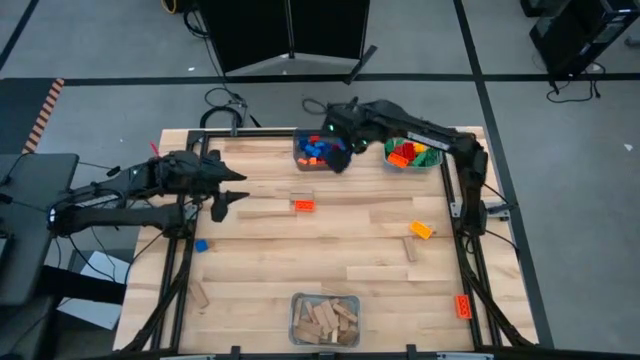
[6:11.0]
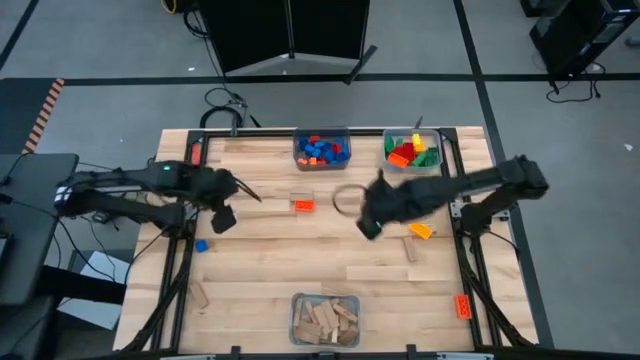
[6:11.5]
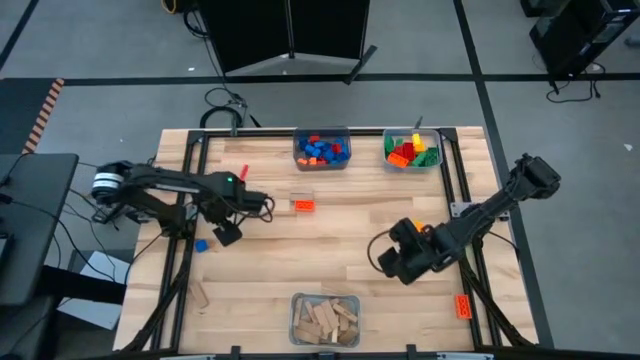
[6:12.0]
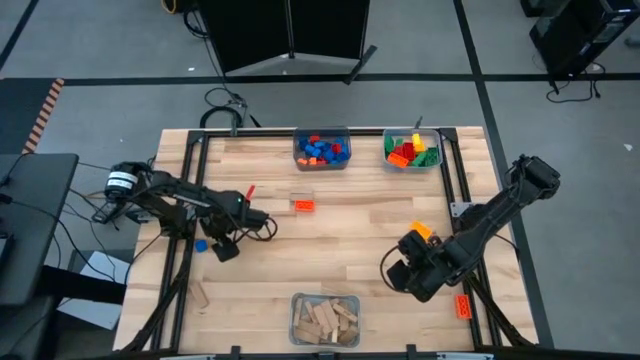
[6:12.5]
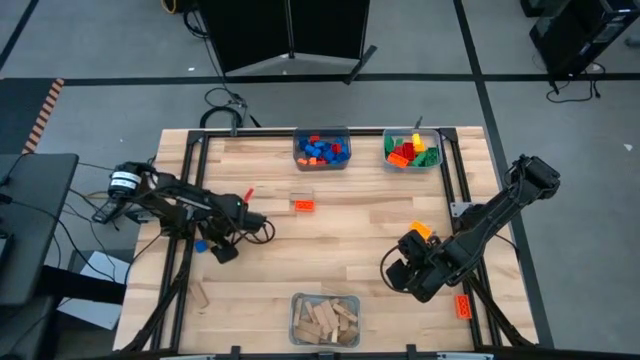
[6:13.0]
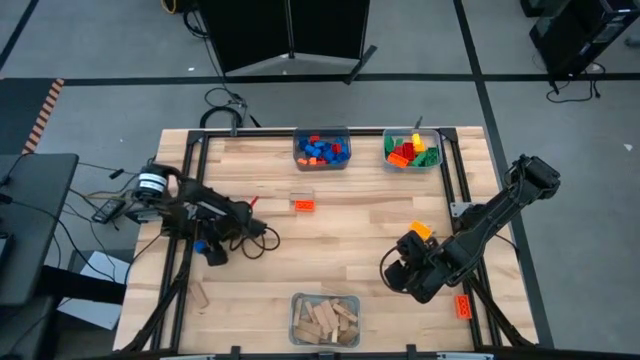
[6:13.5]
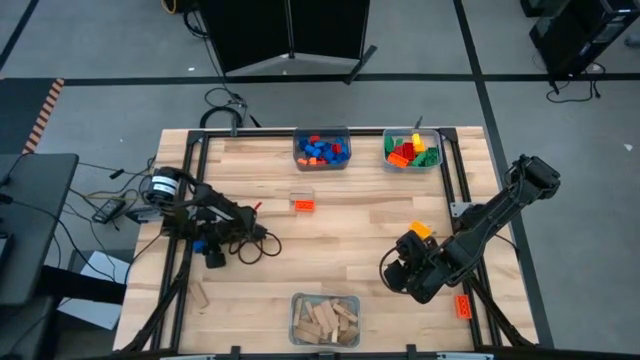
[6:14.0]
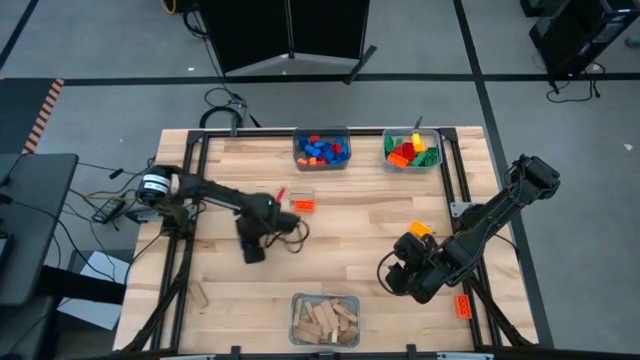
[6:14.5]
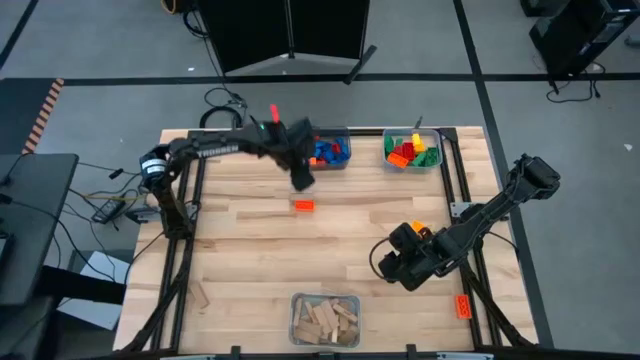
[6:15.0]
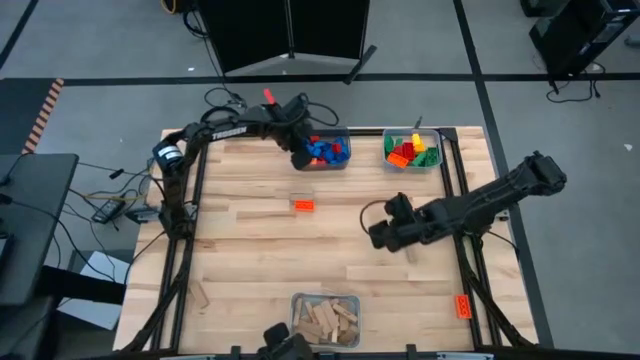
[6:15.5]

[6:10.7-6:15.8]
Task: Sort blocks by size
Put the small blue game piece into the black bin

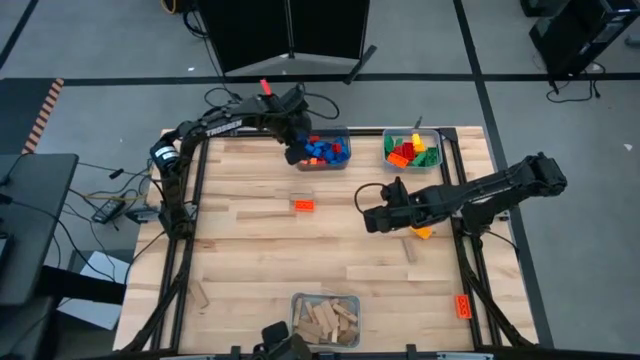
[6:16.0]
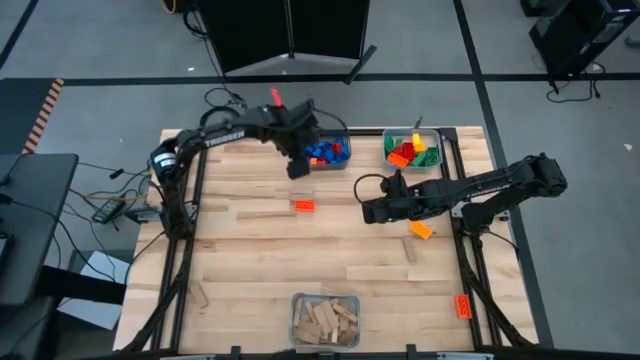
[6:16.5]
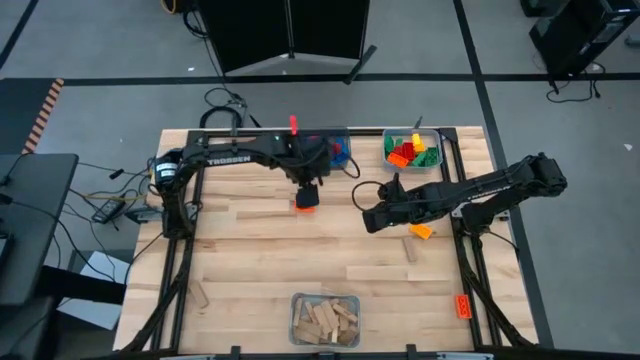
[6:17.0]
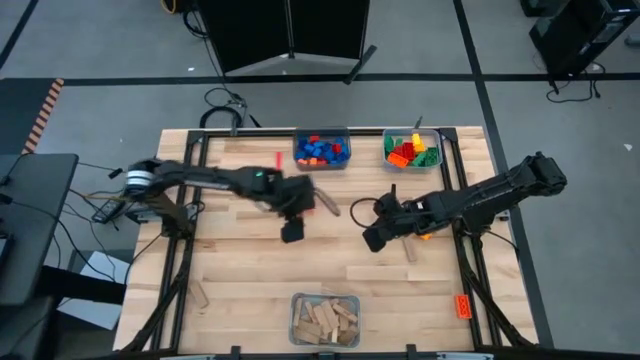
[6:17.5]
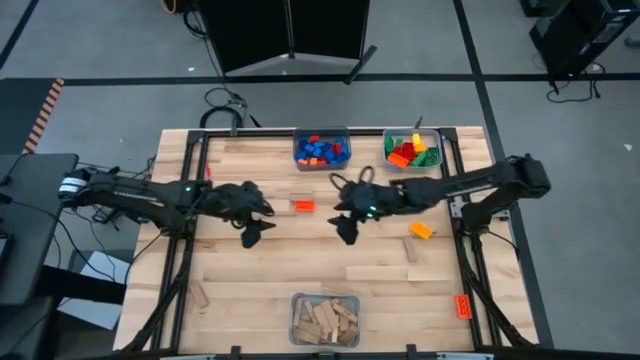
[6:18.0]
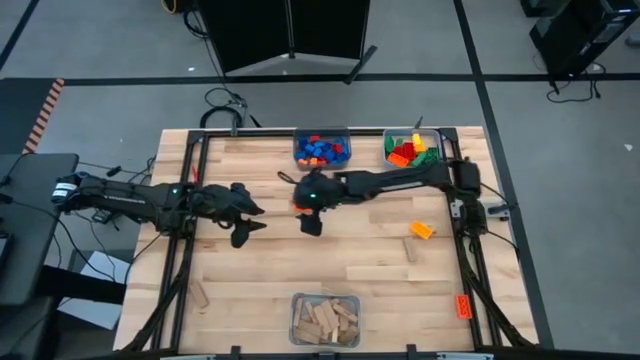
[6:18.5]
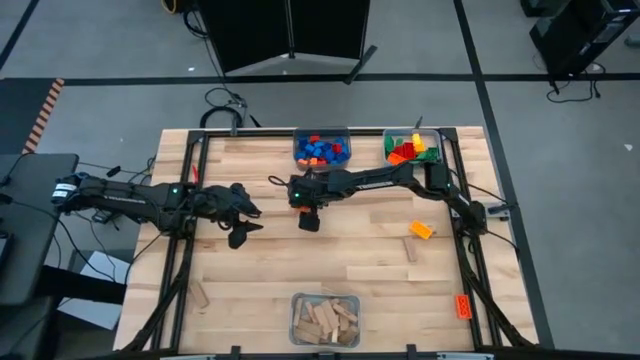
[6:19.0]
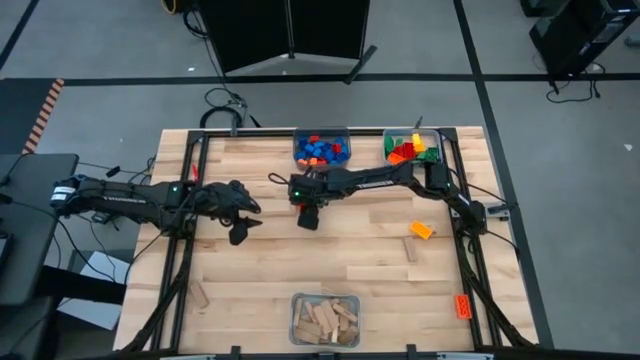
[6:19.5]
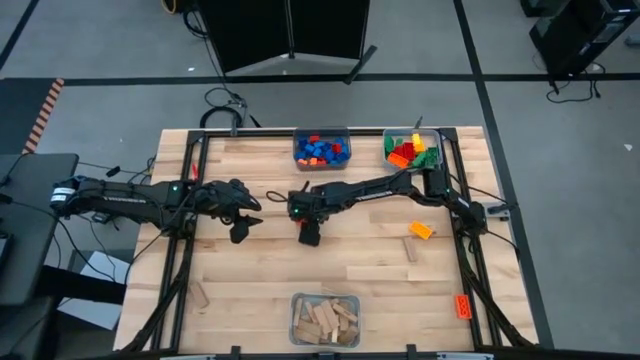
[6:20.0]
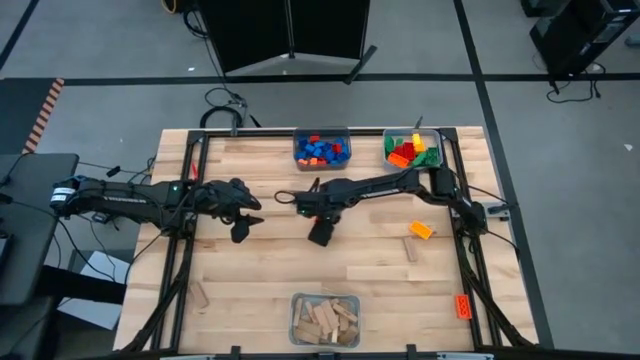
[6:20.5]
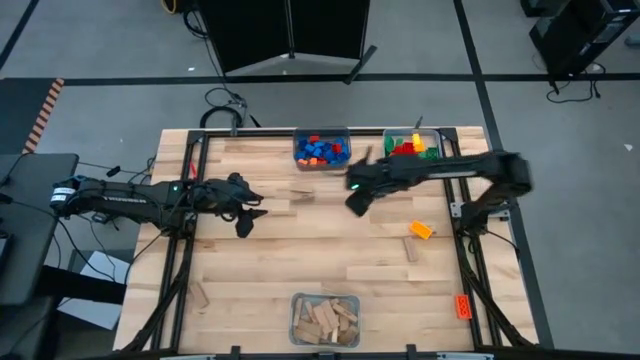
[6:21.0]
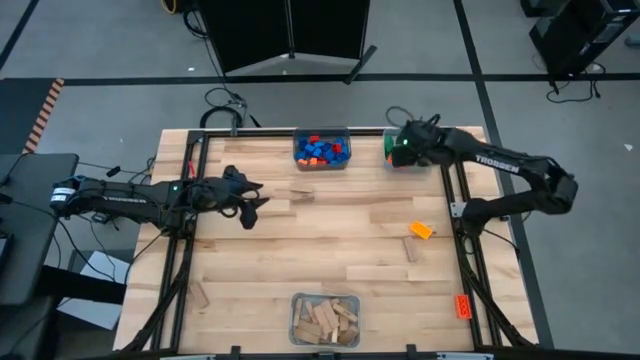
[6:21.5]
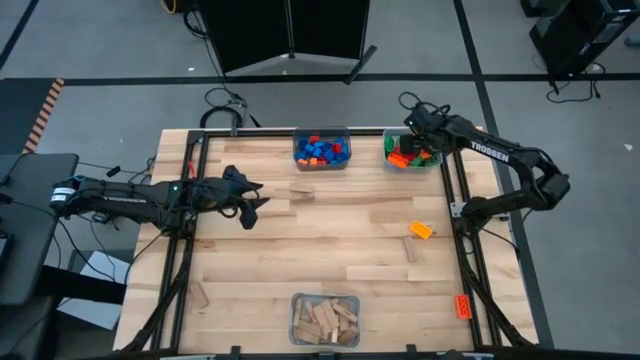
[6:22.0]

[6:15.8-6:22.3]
Put the large orange game piece into the transparent bin

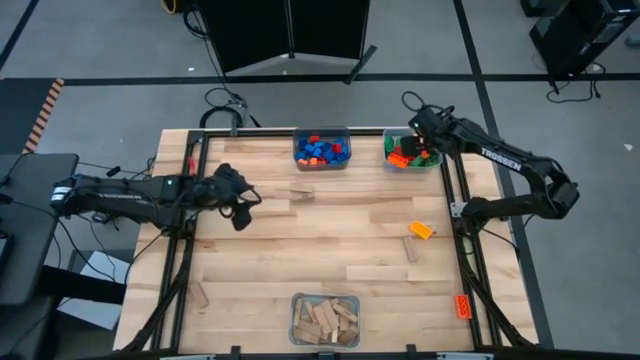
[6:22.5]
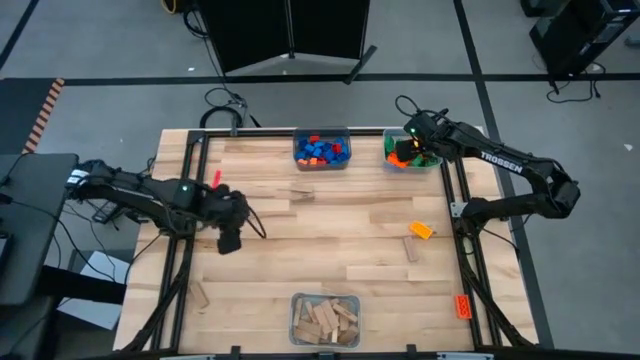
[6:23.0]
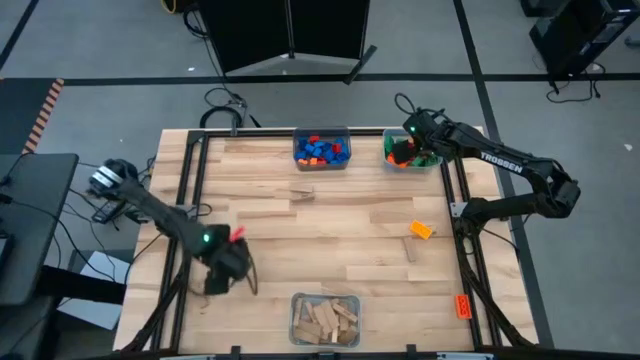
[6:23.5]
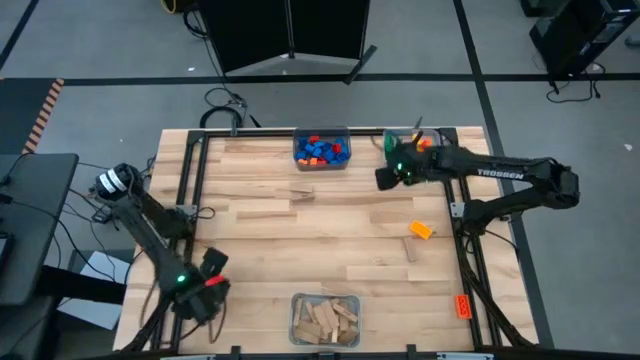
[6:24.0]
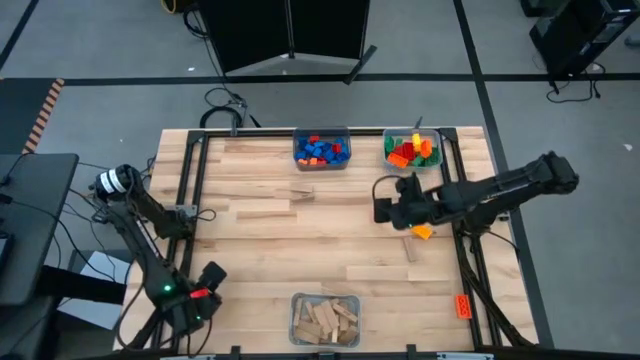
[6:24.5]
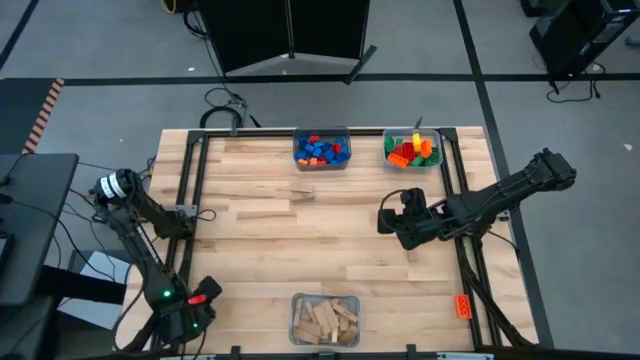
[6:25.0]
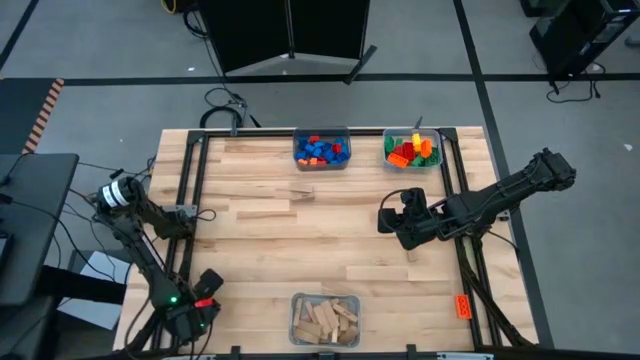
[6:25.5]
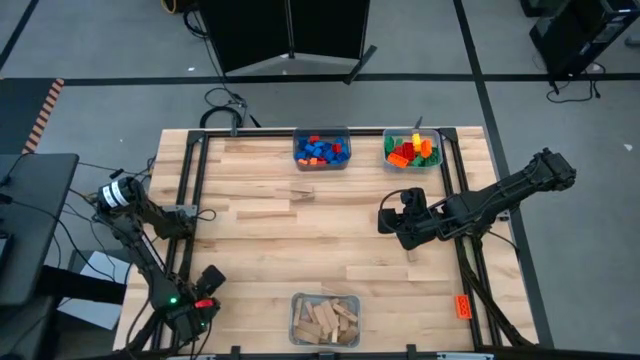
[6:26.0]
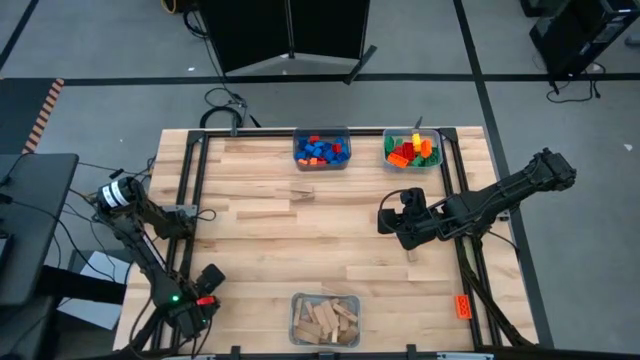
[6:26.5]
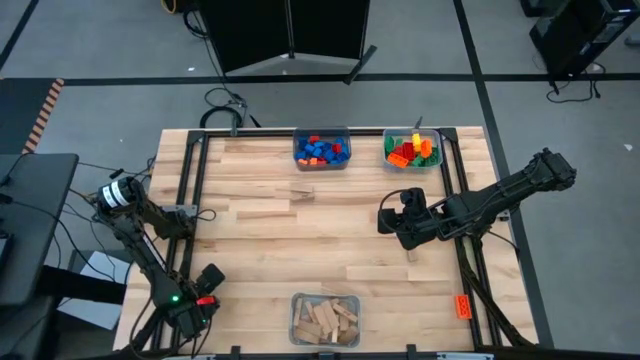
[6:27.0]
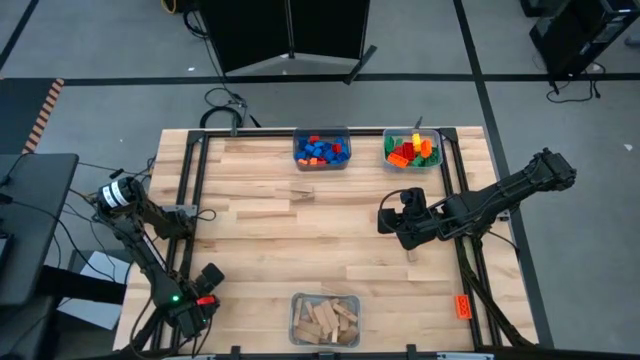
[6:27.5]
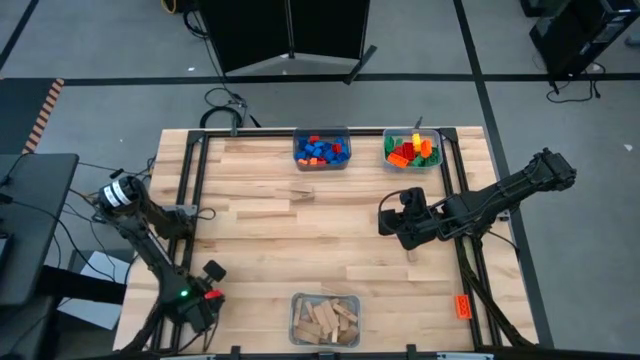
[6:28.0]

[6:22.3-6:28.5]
Put the brown block into the gray bin

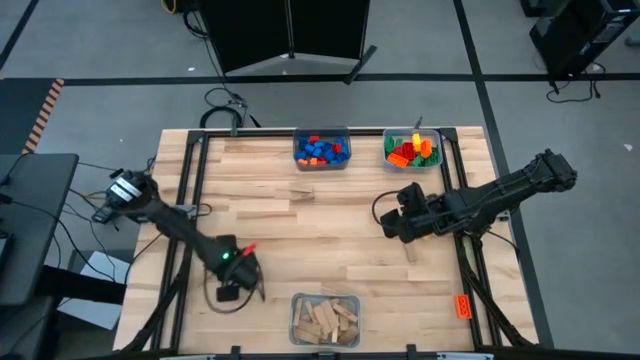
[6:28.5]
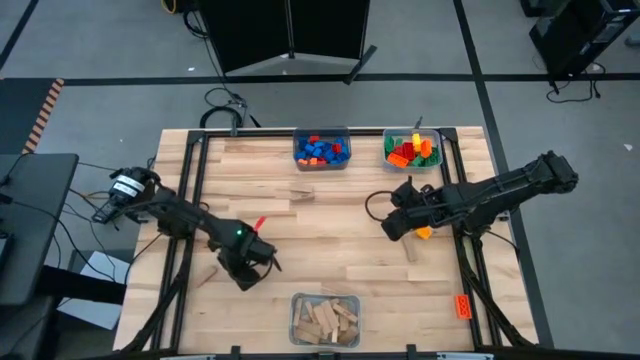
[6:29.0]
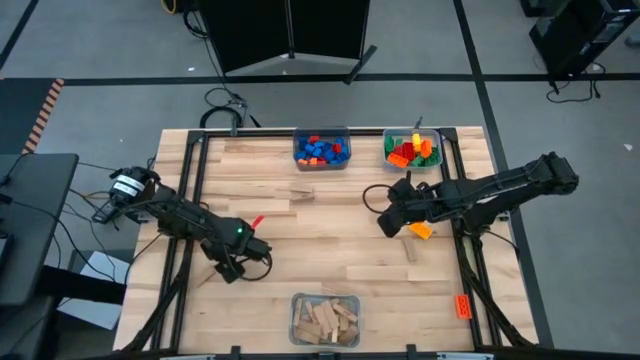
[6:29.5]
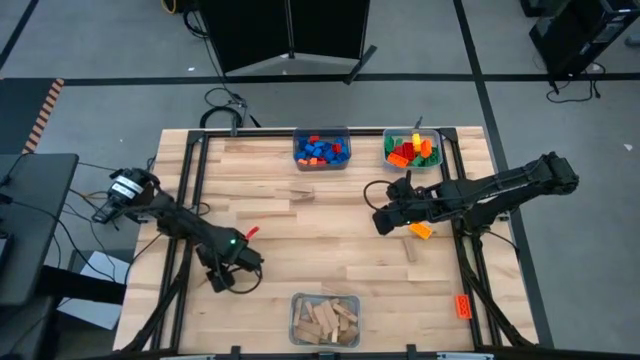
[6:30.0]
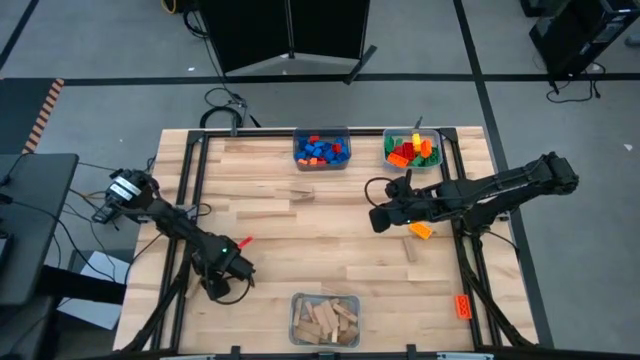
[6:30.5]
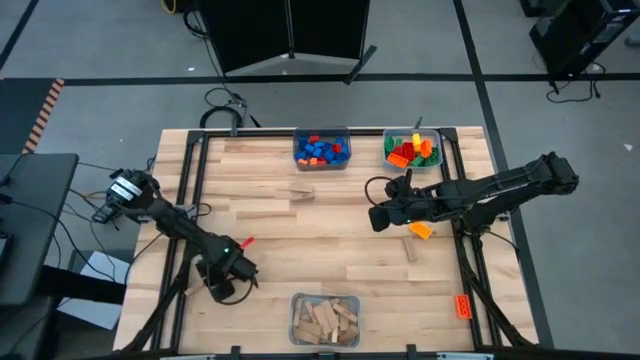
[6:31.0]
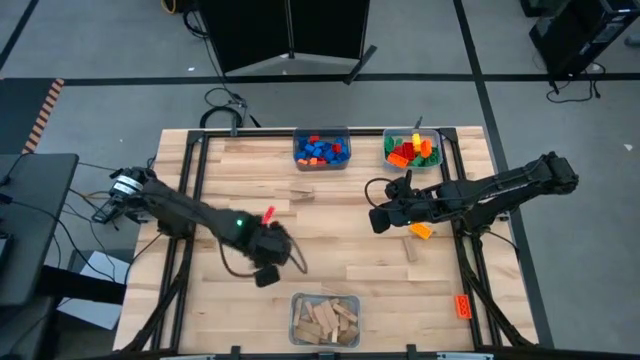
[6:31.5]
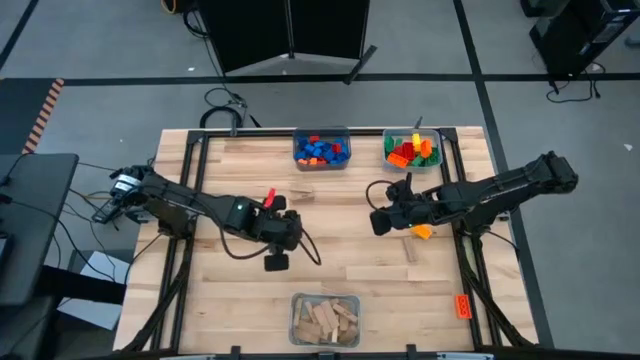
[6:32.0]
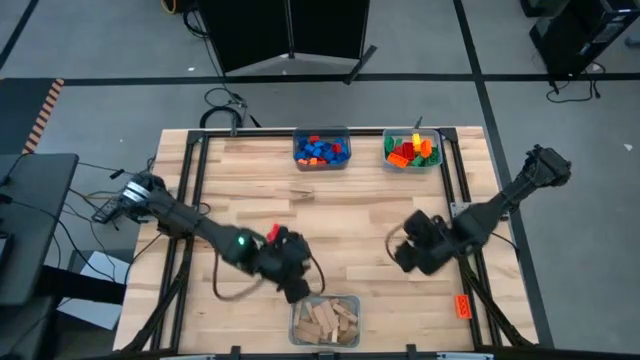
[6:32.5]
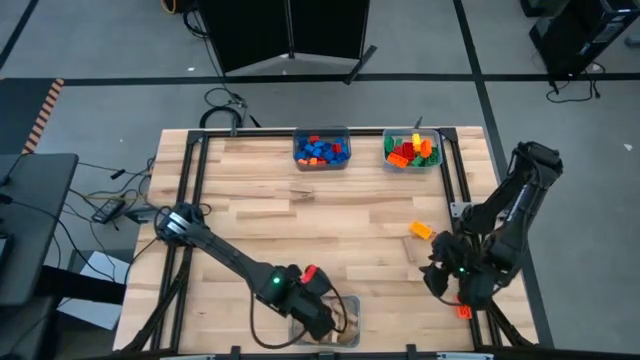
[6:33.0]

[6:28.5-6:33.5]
Put the brown block into the gray bin
